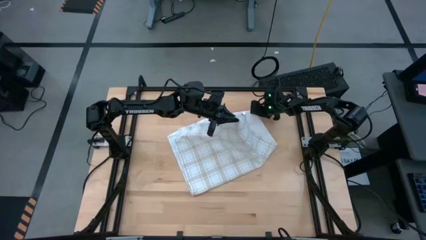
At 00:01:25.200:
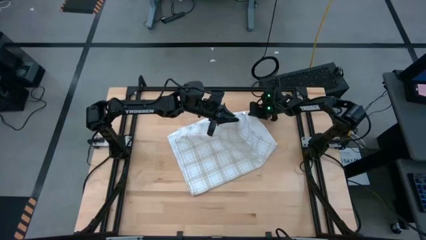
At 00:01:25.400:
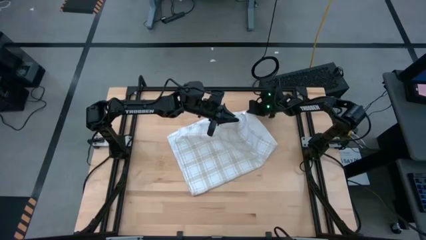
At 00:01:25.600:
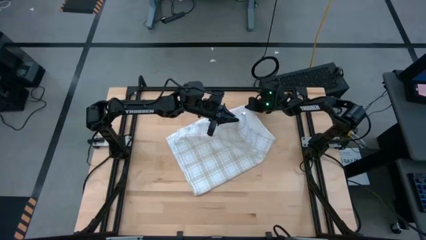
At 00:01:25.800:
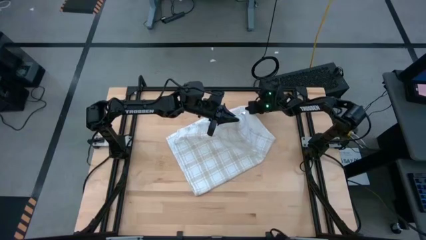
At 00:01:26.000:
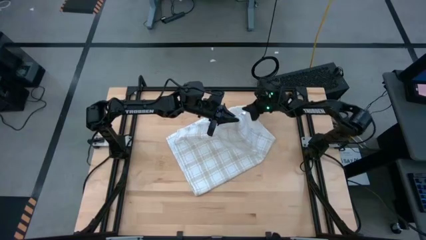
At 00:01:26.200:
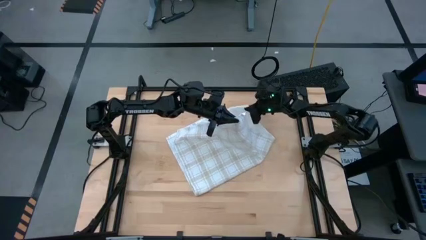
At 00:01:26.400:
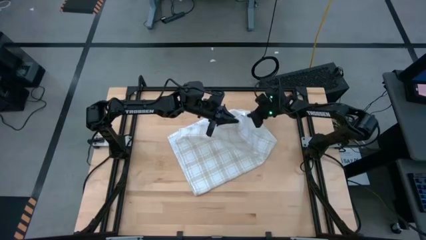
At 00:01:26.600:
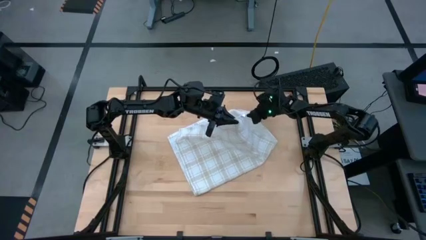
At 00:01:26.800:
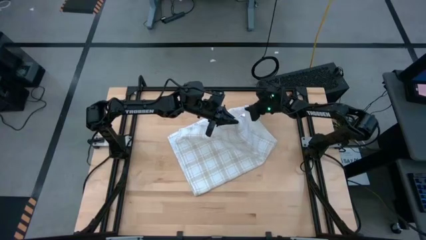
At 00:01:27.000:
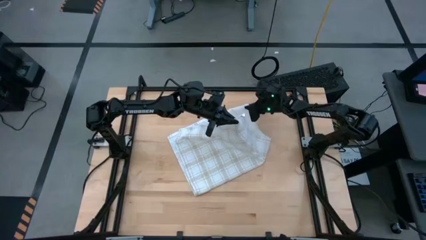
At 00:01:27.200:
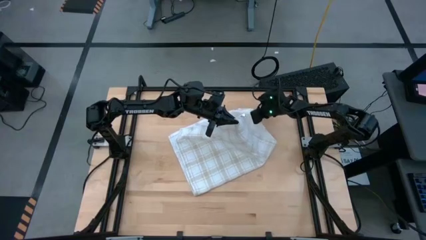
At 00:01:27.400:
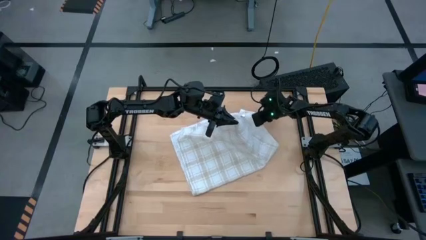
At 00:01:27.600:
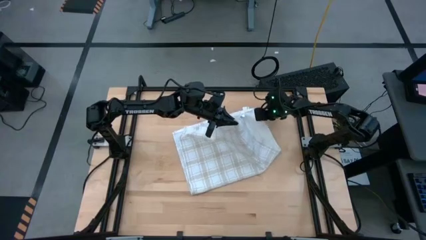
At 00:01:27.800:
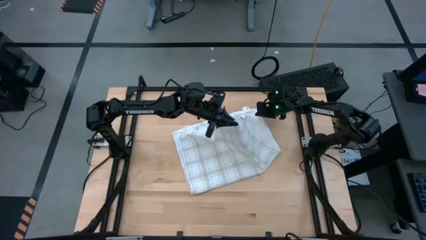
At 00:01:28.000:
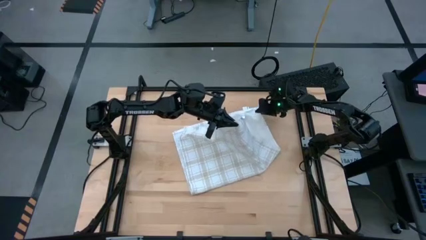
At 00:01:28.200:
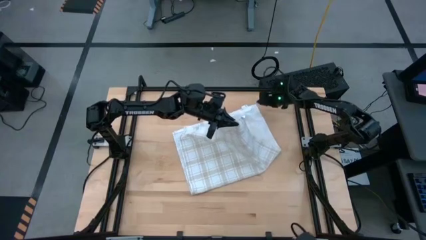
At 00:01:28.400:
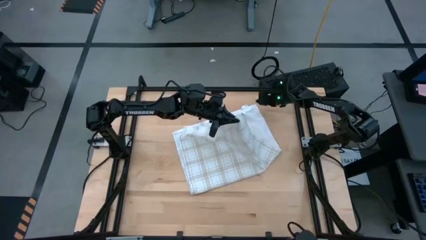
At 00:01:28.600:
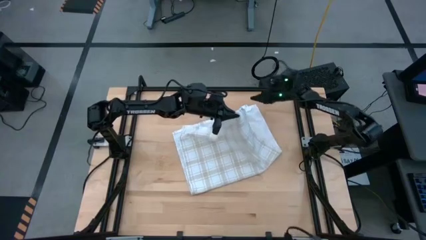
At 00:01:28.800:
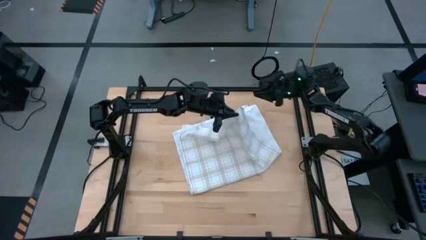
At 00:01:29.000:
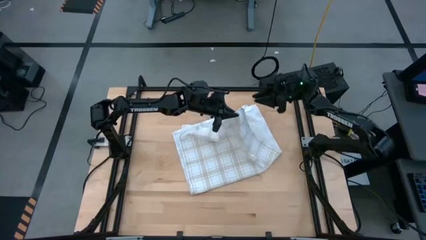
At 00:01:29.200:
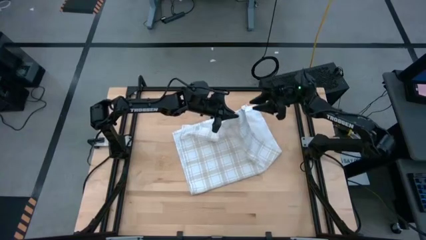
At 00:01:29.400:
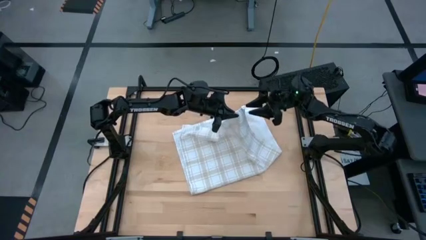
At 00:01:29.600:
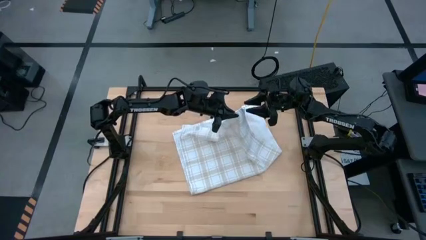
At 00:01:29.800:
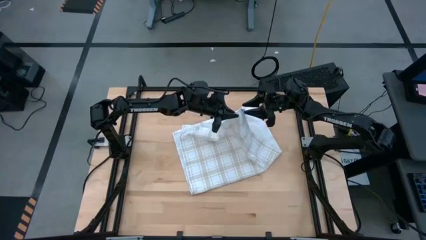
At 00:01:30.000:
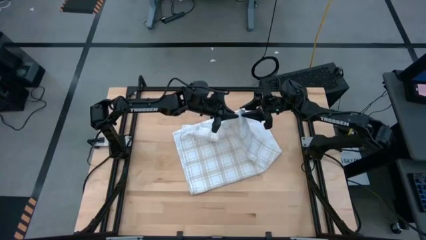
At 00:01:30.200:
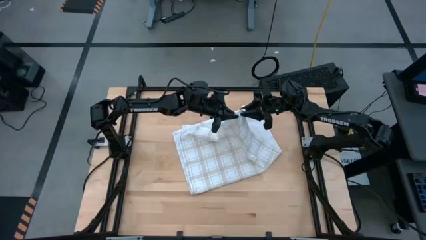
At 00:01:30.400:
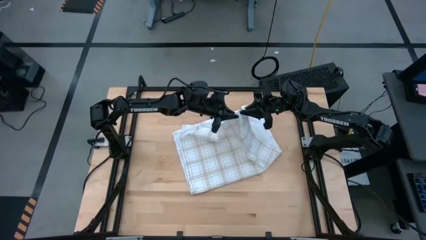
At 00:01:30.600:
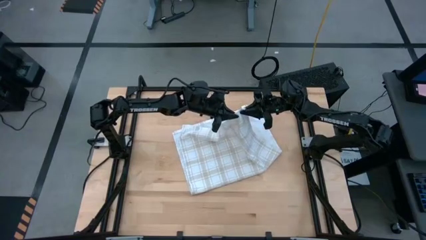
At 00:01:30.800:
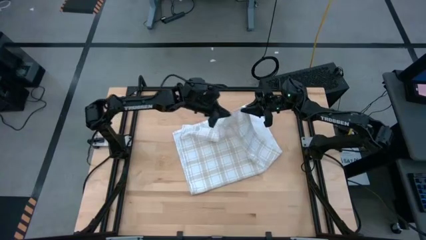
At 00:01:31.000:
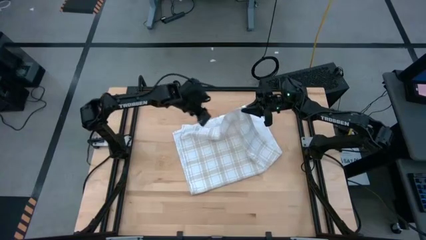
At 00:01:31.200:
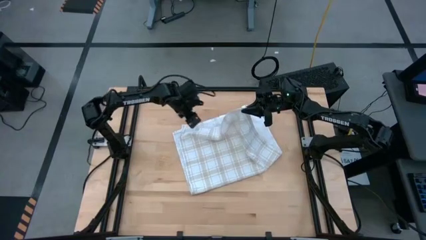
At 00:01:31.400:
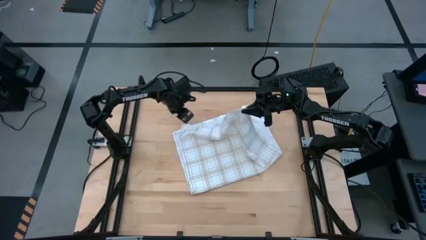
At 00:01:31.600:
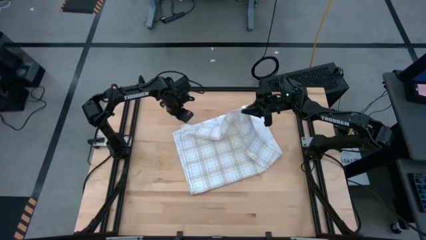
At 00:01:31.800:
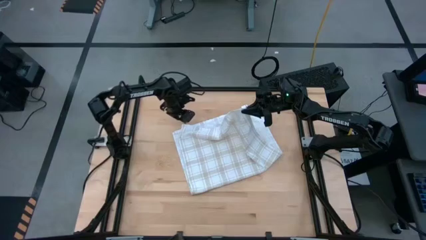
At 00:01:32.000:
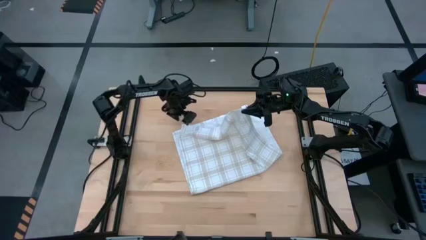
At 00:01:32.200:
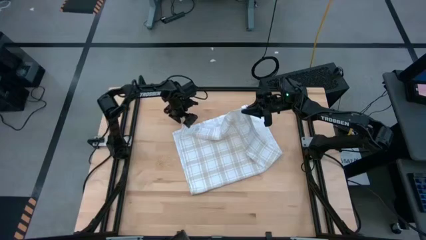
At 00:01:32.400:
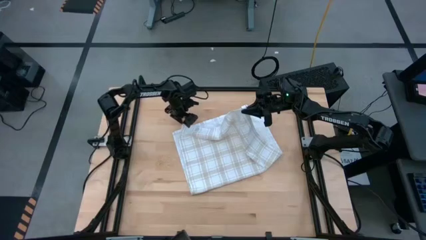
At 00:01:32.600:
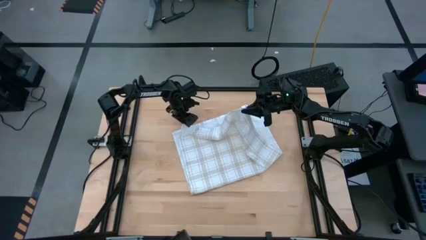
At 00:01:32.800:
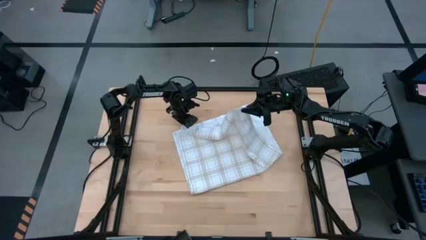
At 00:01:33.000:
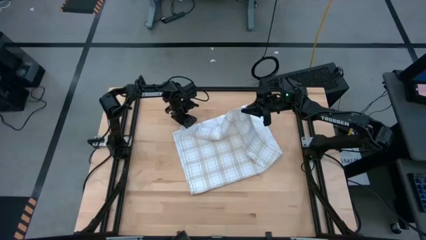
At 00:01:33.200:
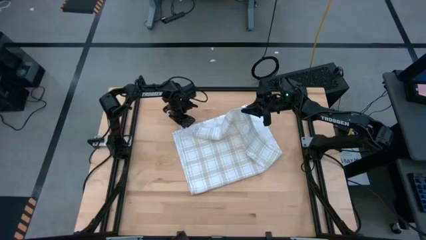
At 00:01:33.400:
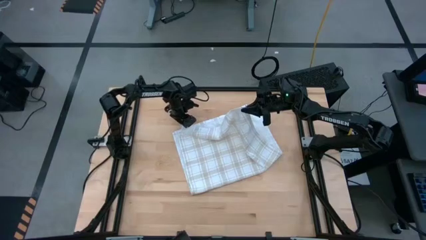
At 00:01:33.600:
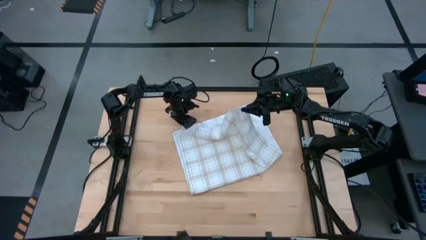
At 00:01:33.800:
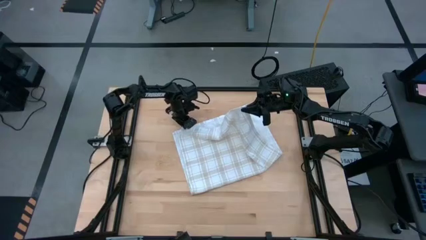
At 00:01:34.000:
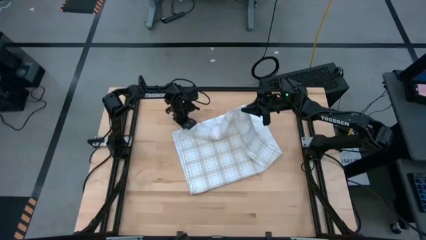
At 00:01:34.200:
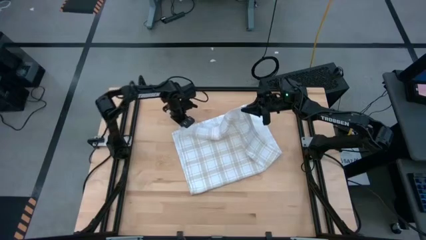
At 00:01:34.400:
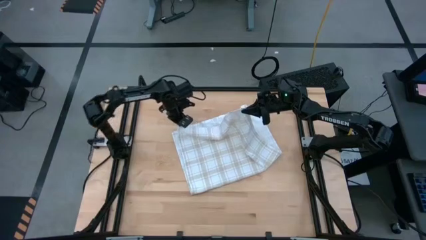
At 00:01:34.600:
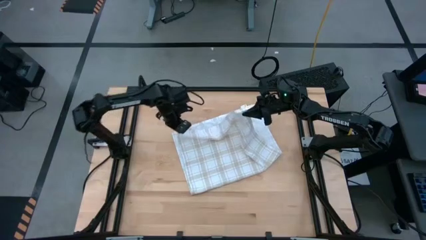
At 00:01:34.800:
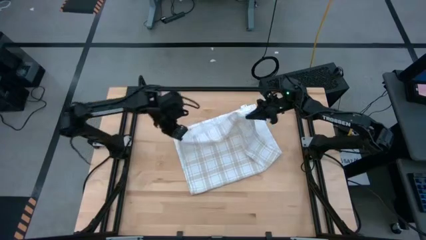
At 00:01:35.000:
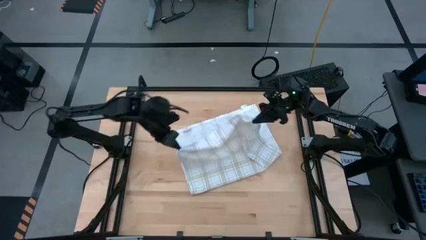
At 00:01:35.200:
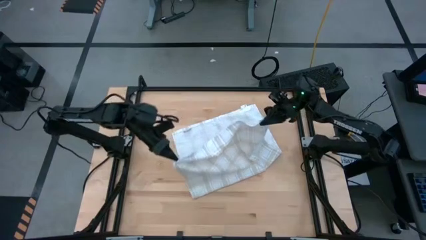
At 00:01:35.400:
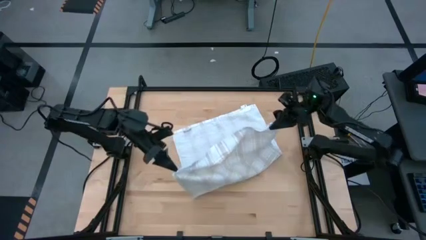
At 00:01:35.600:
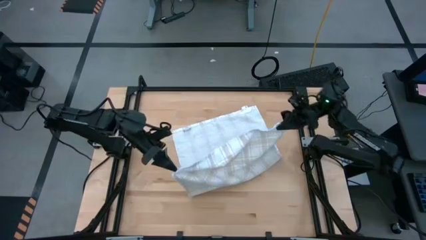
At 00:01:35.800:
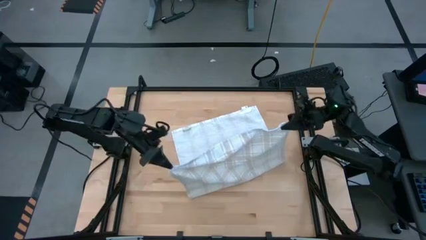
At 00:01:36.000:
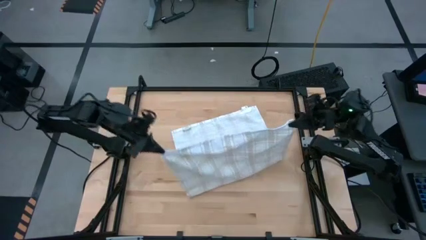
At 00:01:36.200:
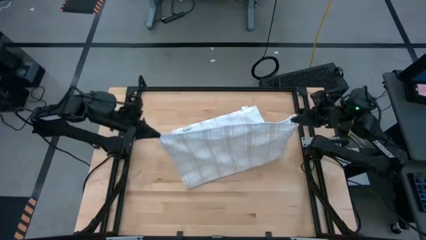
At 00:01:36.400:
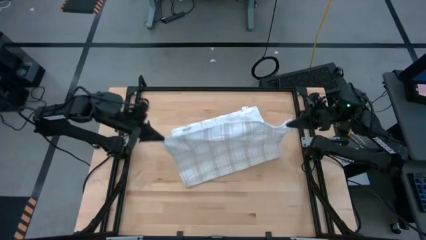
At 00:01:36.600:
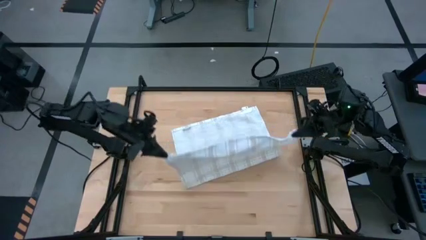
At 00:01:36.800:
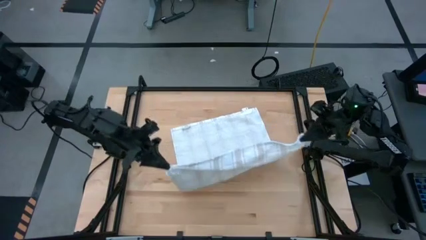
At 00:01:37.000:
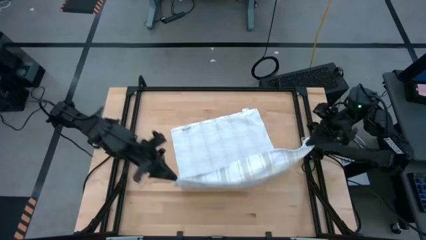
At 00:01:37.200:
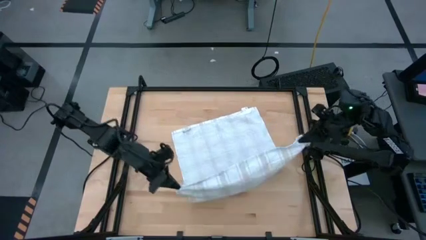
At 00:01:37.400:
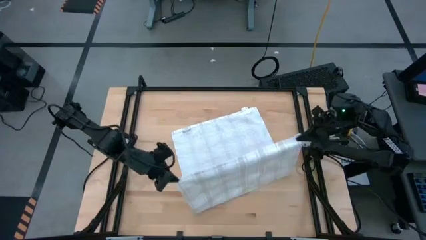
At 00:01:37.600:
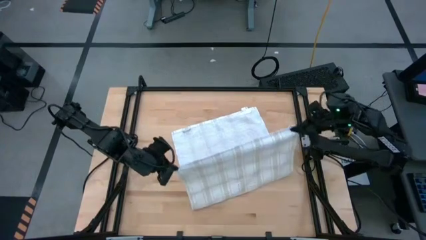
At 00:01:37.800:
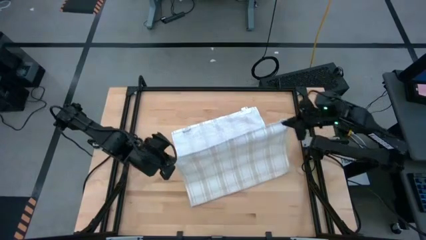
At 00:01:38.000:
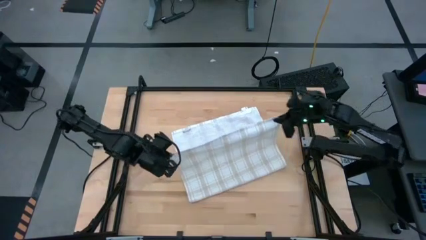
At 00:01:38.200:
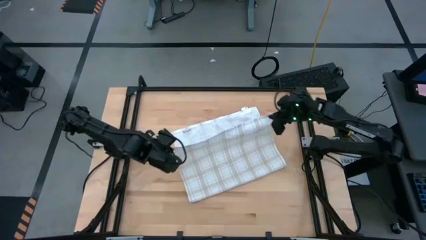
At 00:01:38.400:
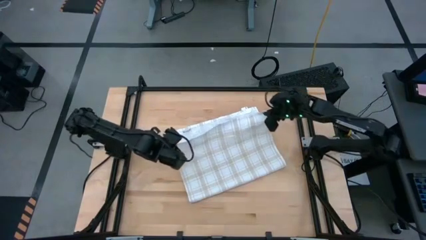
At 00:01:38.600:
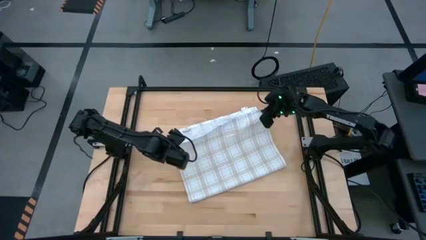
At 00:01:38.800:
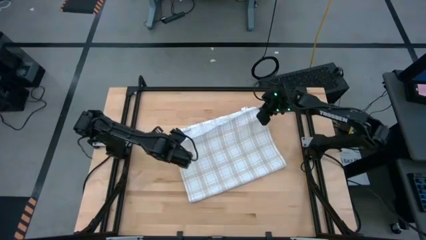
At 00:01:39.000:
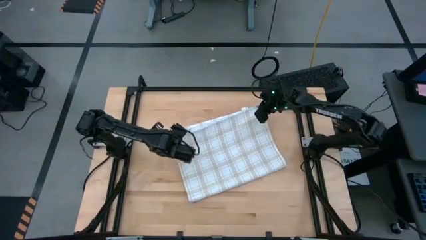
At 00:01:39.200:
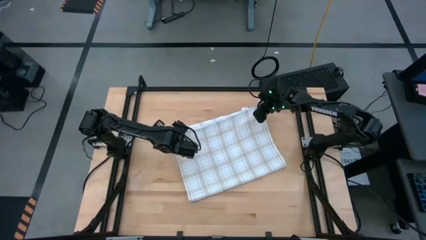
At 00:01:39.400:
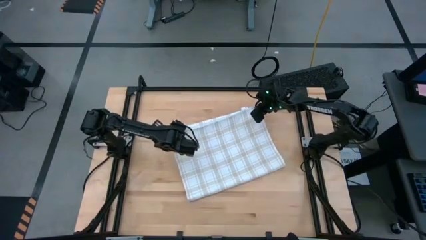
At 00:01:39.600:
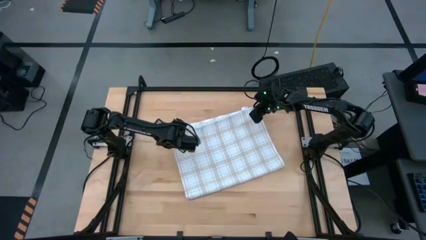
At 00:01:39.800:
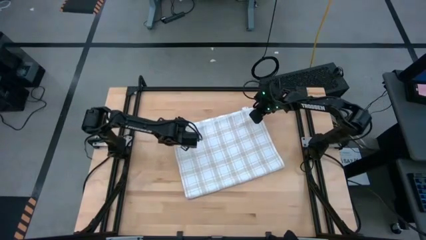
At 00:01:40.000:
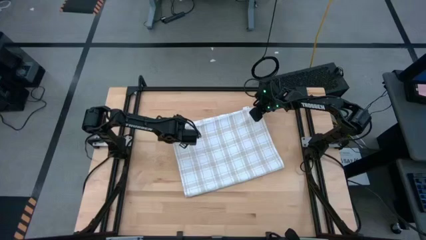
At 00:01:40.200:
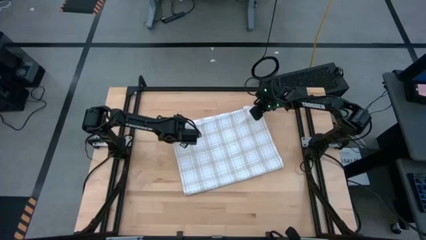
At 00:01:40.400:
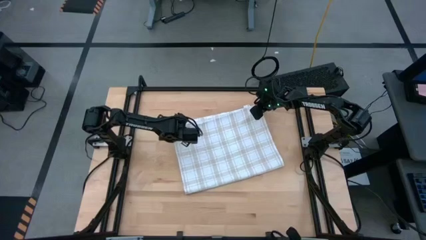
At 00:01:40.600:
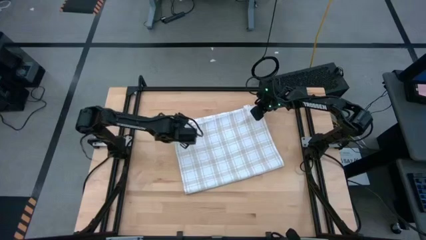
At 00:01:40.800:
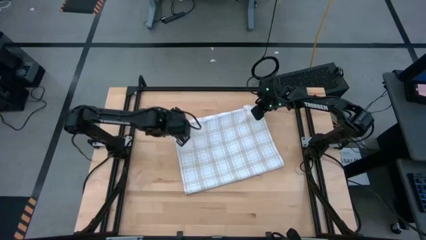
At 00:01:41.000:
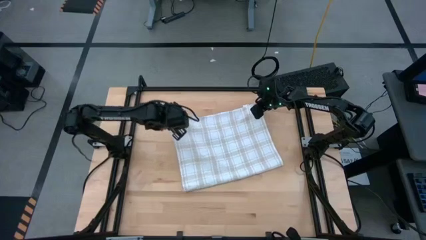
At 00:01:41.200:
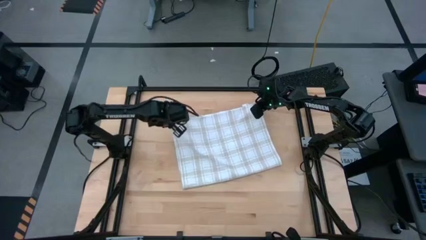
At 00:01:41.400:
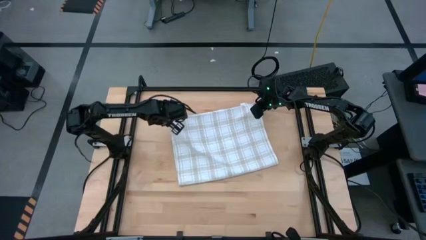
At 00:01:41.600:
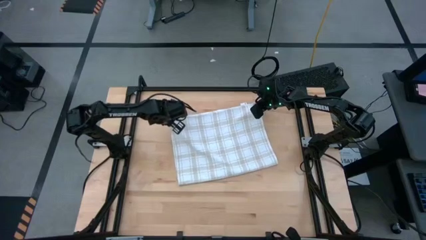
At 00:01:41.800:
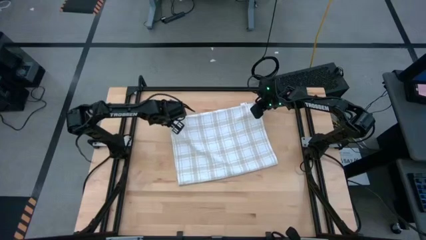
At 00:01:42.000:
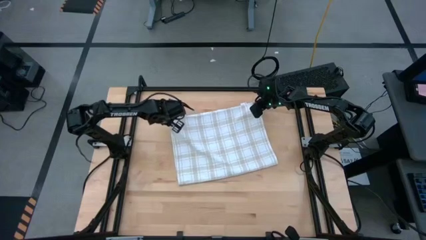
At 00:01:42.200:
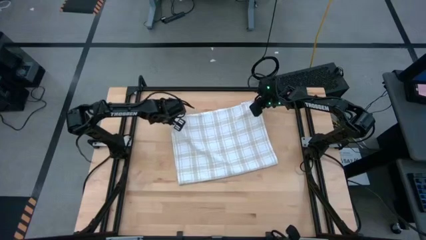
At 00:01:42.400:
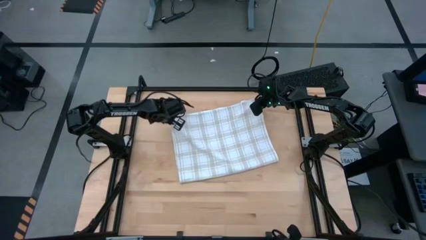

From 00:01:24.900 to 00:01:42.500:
Task: Roll towel
Roll the towel
